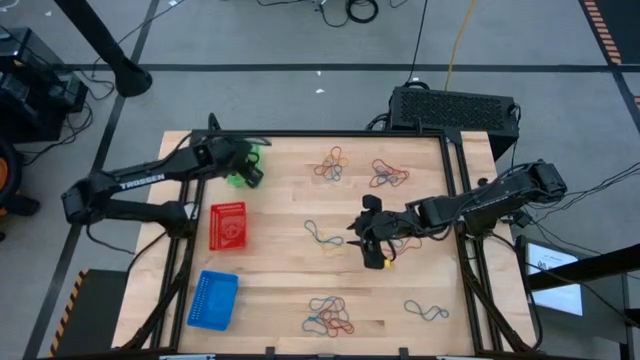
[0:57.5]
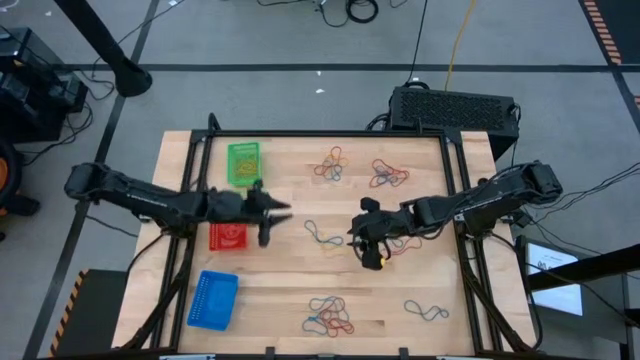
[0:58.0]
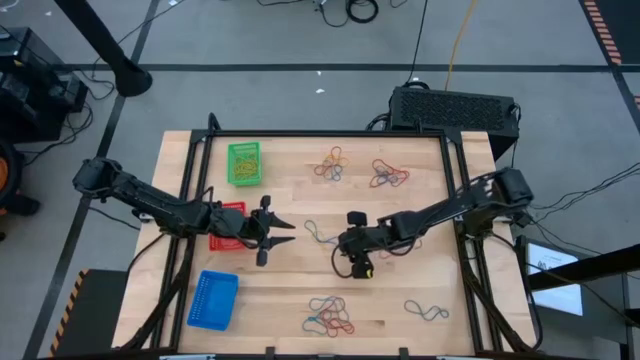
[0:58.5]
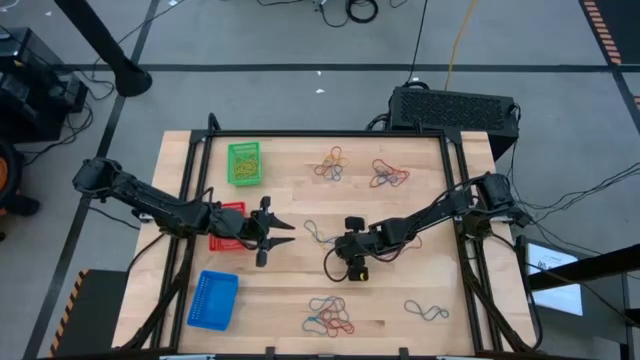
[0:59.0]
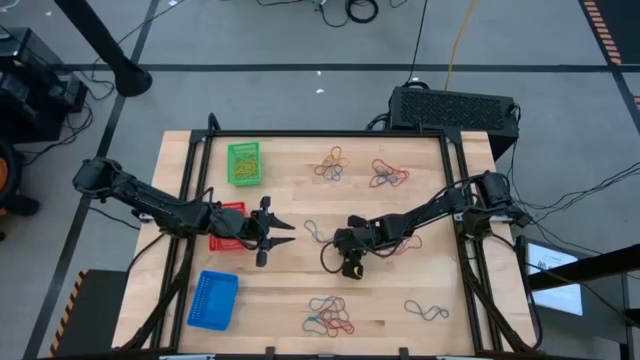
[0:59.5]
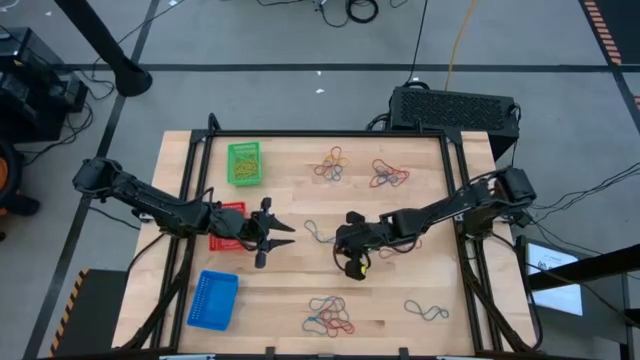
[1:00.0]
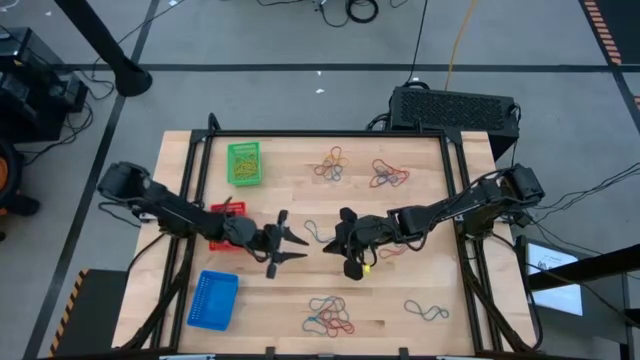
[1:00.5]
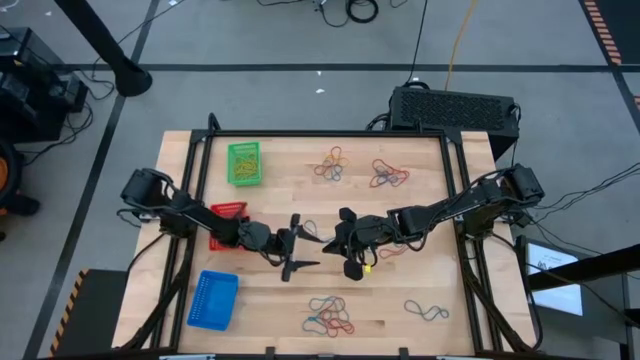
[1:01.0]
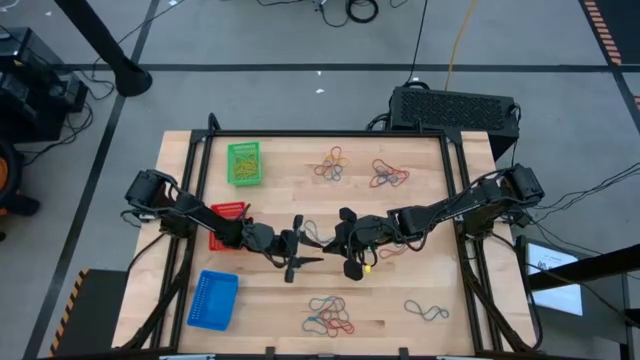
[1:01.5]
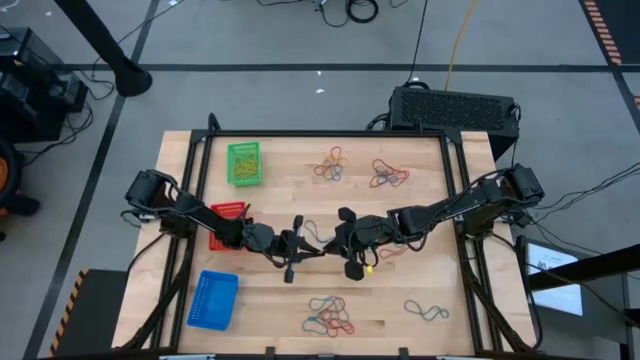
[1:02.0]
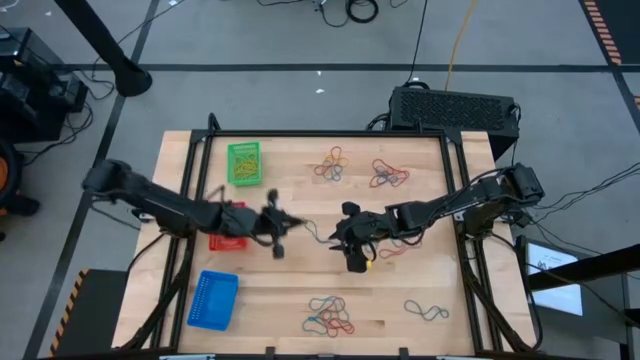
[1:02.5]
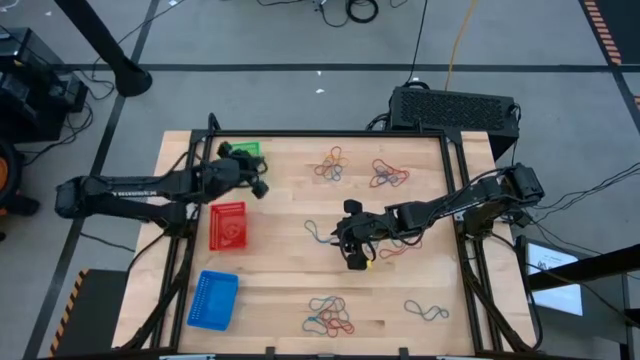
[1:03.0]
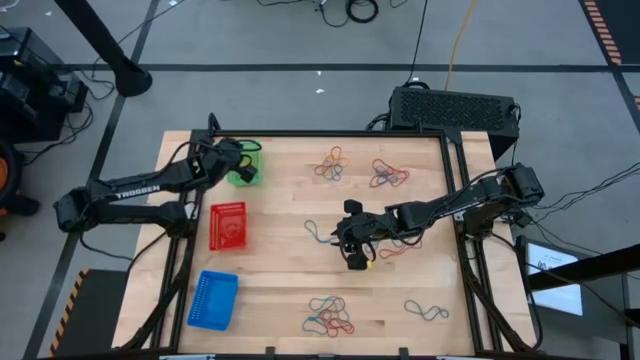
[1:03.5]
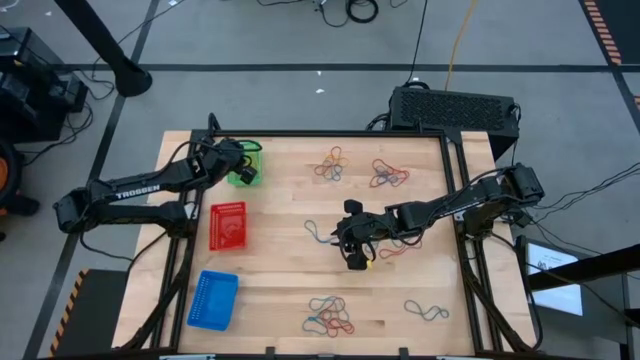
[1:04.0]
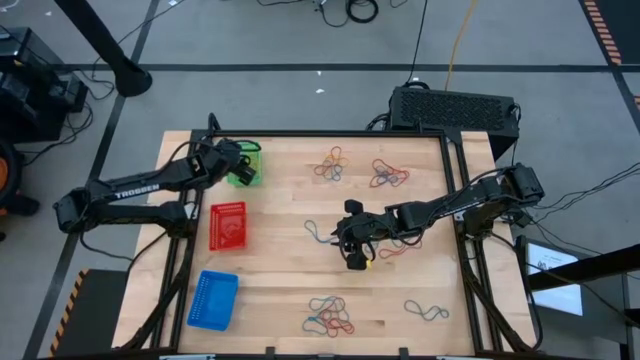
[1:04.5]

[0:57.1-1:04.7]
Task: Sort rubber bands into baskets
Put the yellow rubber band into the green bin

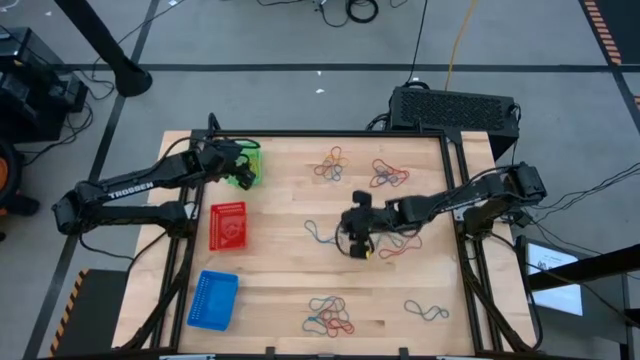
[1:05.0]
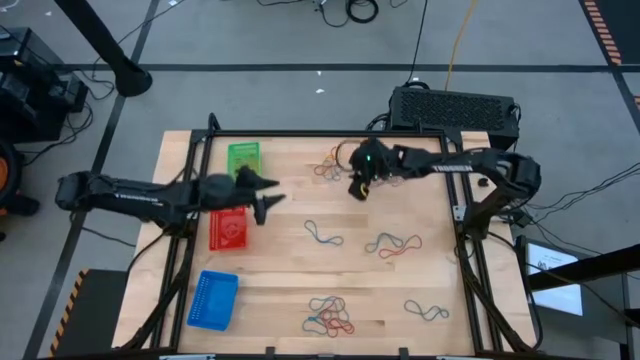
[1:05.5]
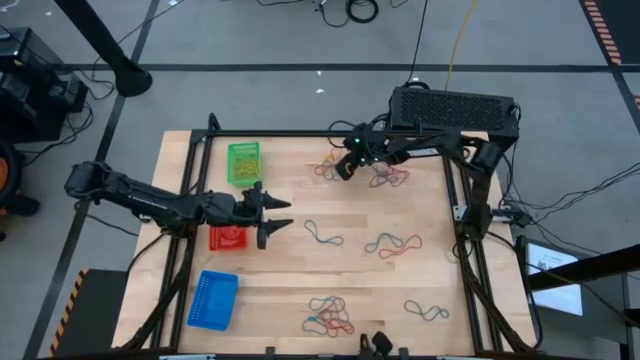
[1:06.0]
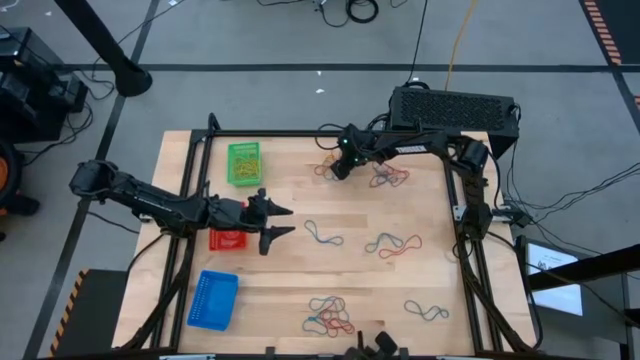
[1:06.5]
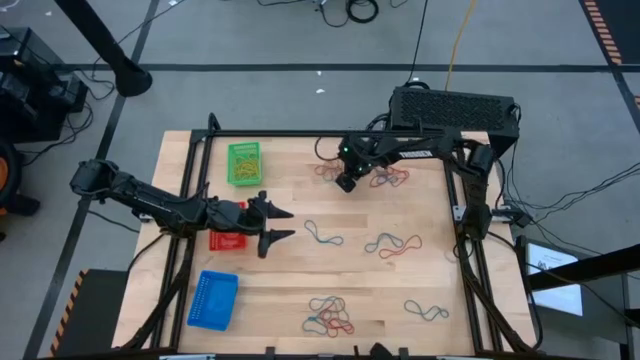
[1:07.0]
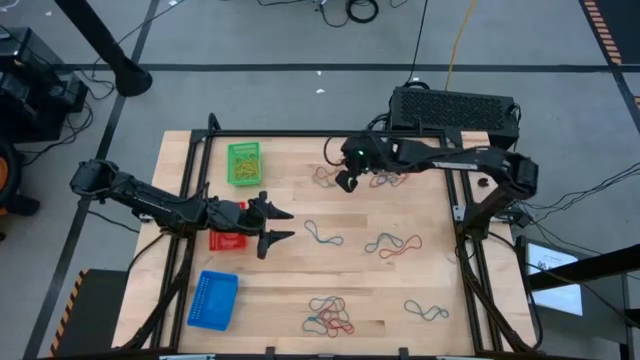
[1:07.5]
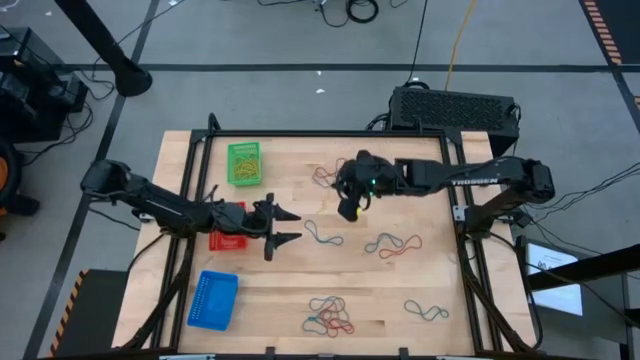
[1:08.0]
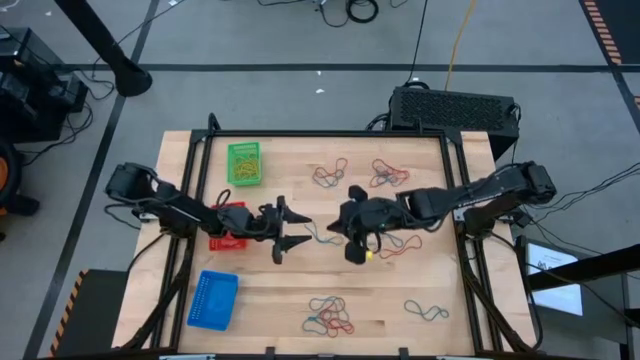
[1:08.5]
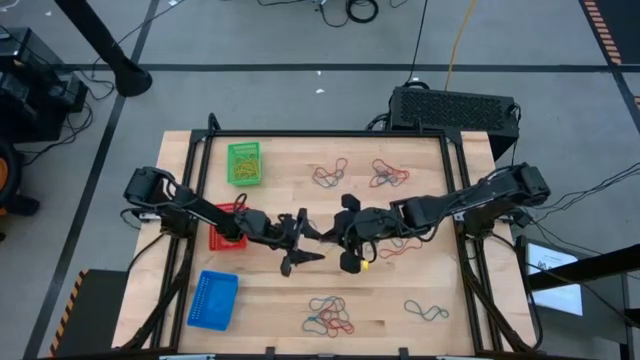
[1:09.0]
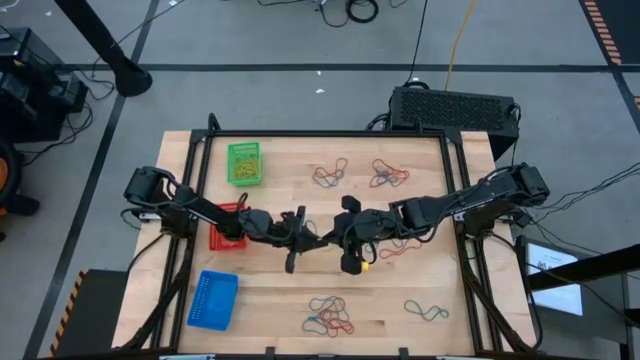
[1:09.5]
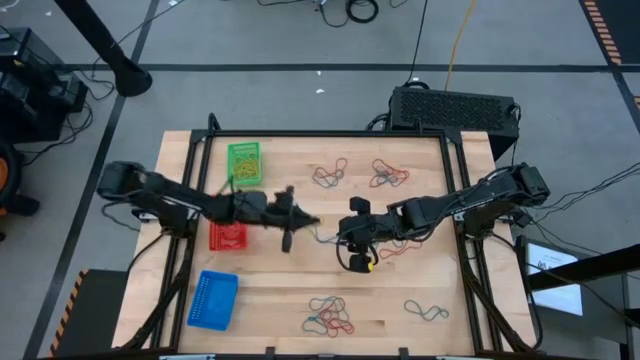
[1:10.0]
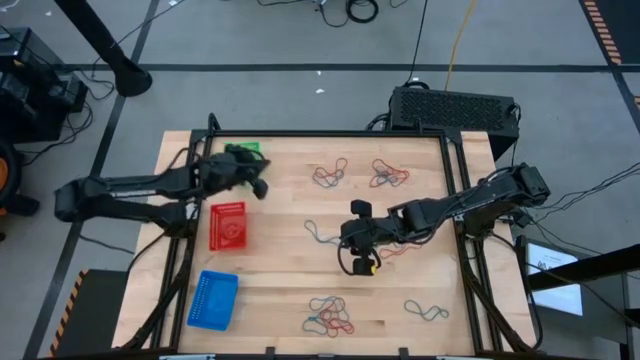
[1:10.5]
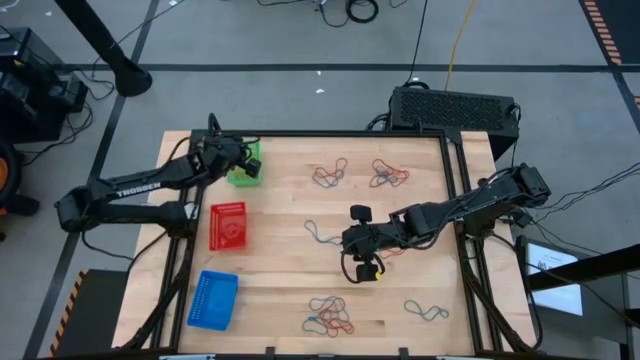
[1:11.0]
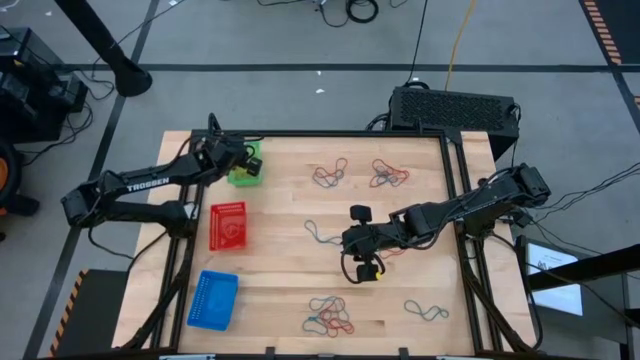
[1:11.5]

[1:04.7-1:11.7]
Put the yellow rubber band into the green bin

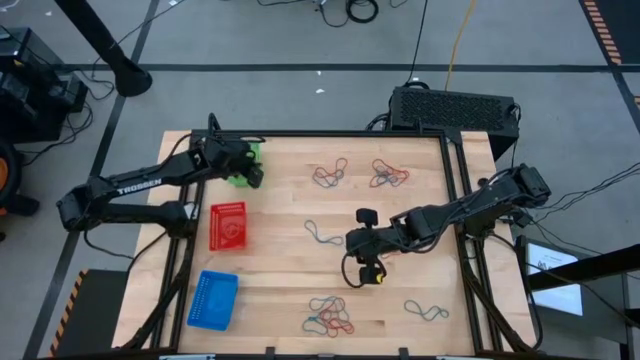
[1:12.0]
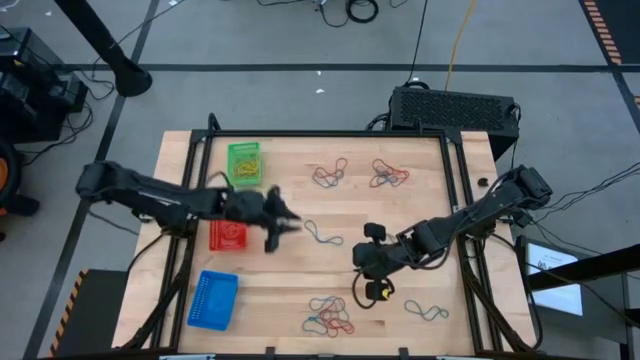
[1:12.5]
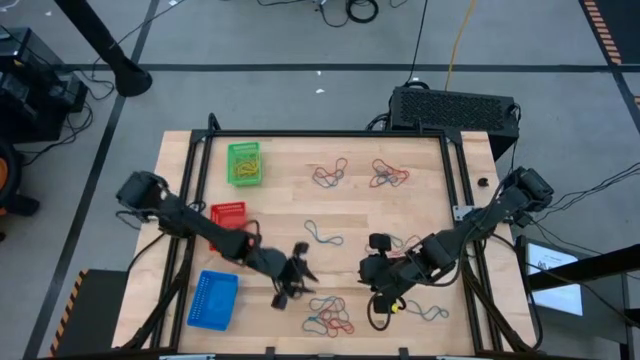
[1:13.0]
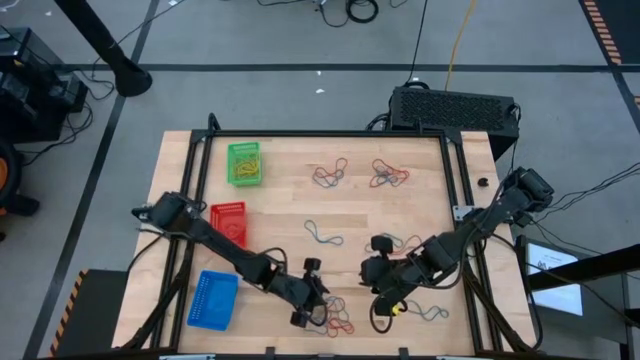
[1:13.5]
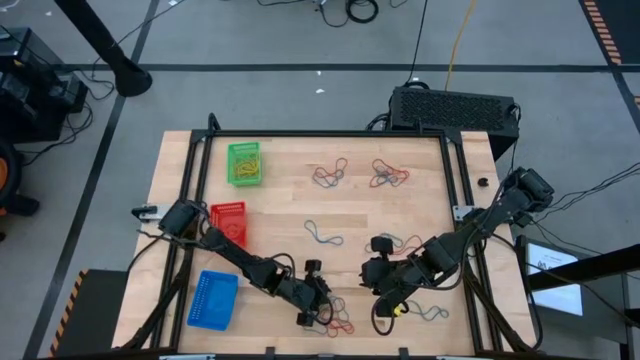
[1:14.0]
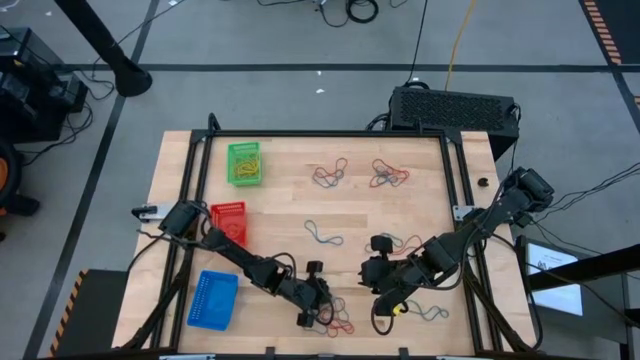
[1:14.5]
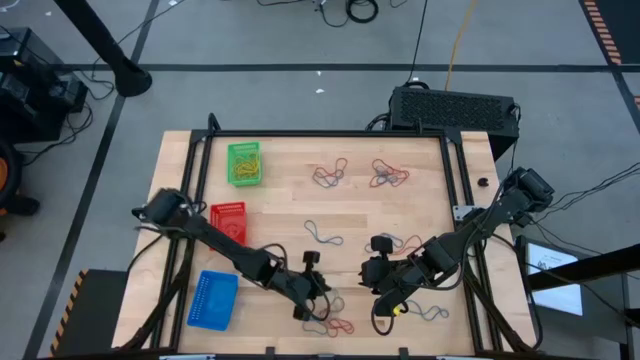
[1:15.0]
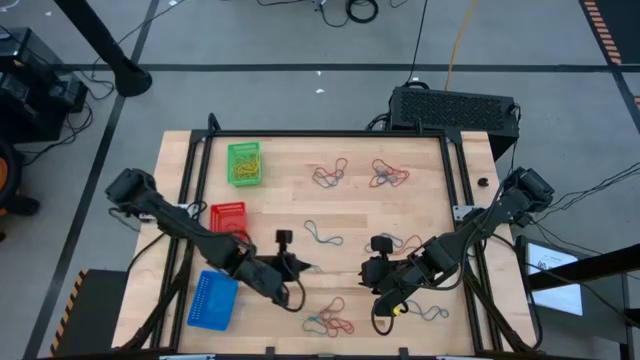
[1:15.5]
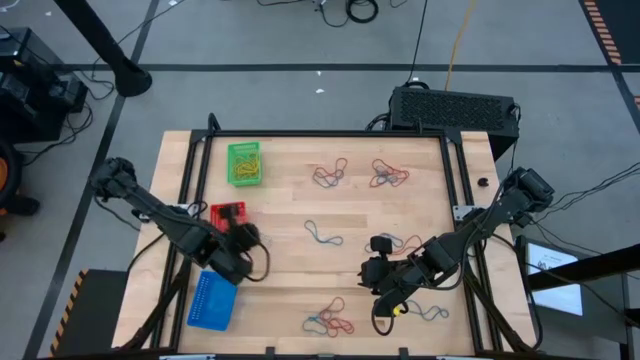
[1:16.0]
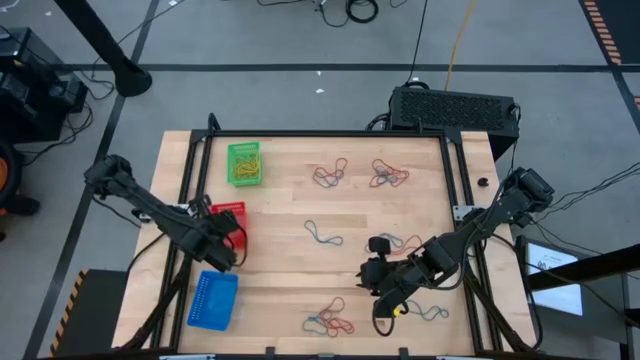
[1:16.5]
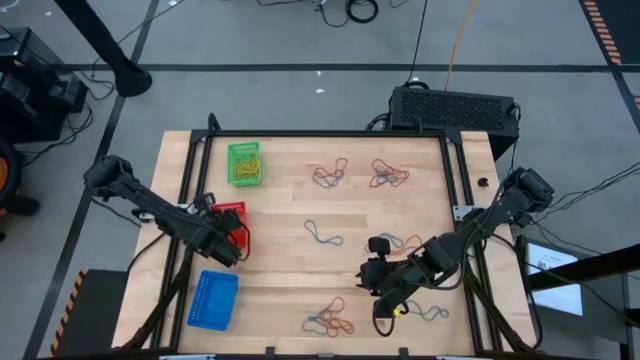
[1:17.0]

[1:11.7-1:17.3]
Put the blue rubber band into the red bin

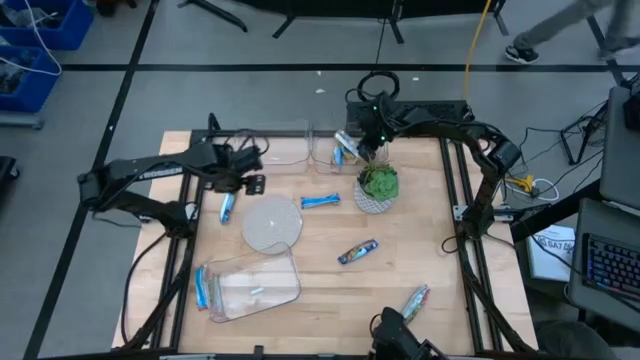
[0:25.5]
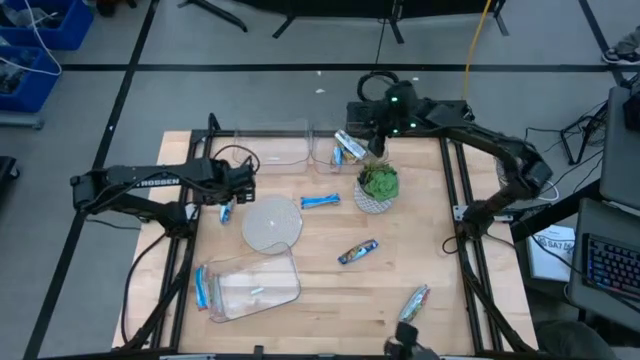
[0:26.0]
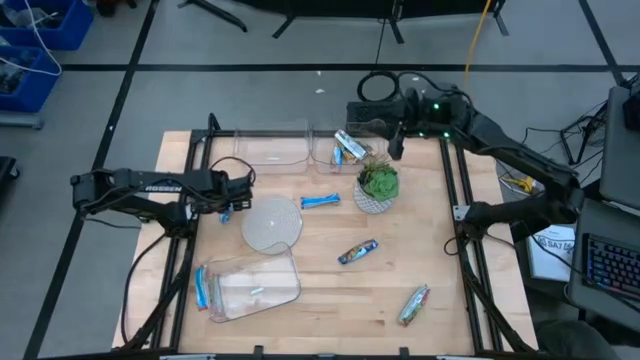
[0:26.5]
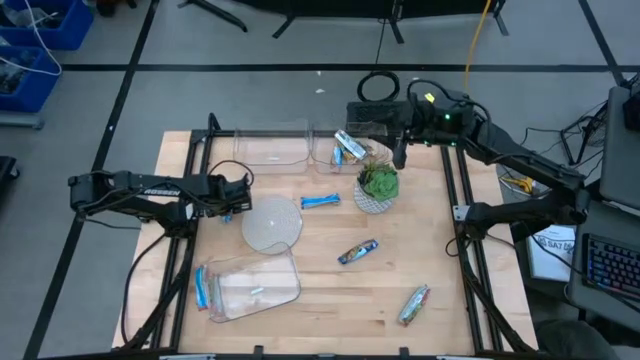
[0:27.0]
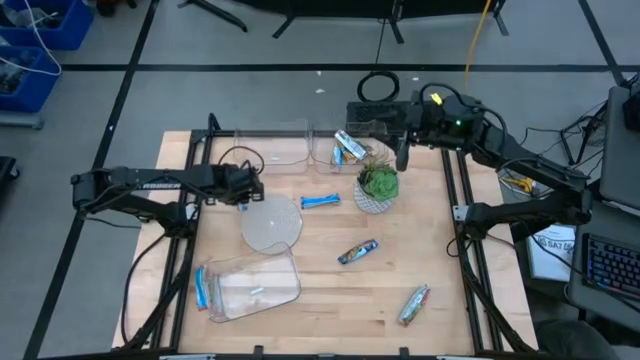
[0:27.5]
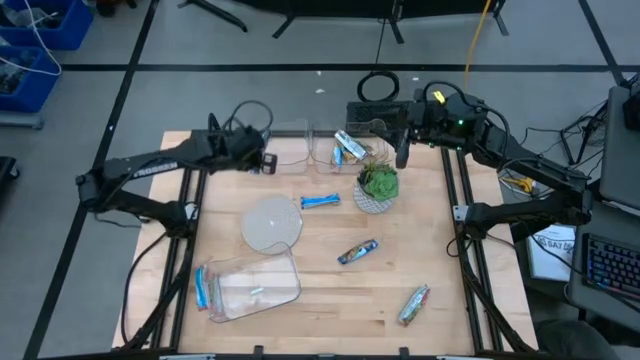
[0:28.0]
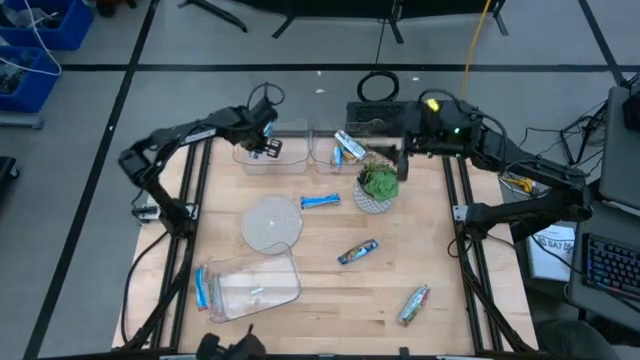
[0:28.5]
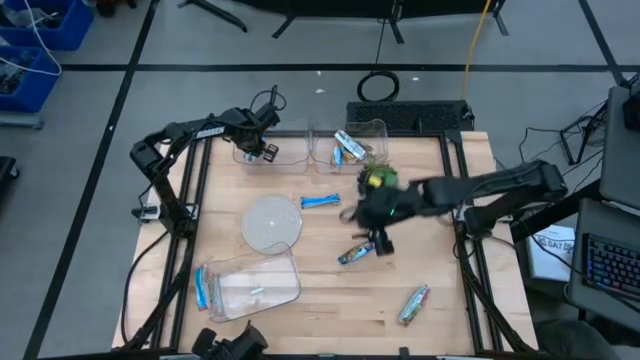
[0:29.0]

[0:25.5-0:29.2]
Task: Pick and place Granola Bars by type
Put the blue granola bar into the top left transparent bin
